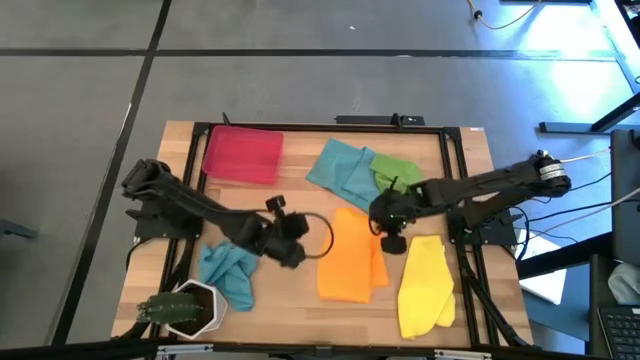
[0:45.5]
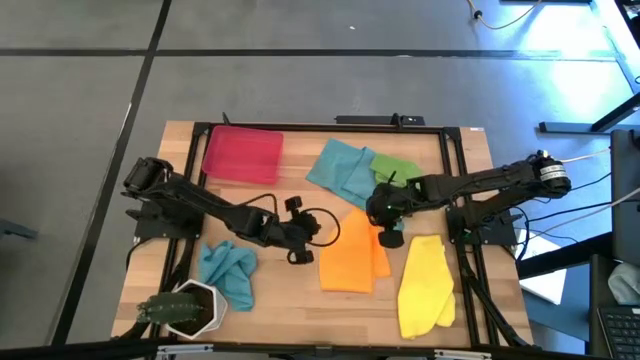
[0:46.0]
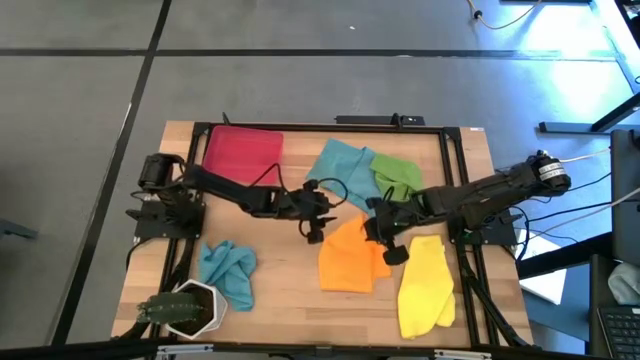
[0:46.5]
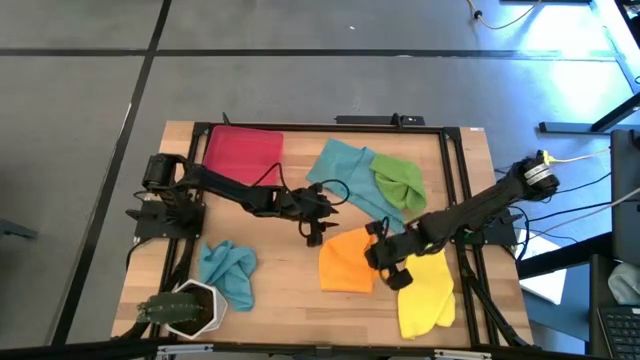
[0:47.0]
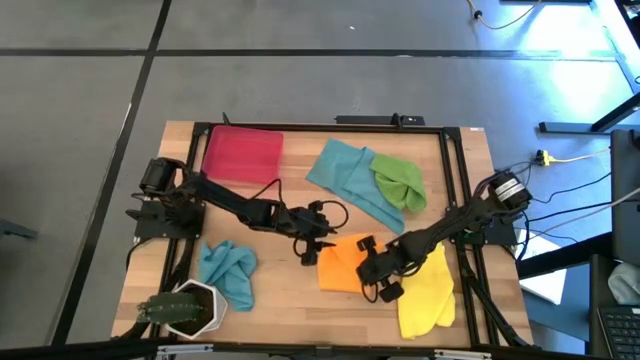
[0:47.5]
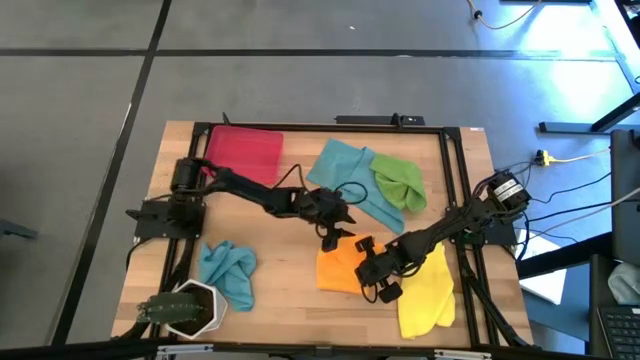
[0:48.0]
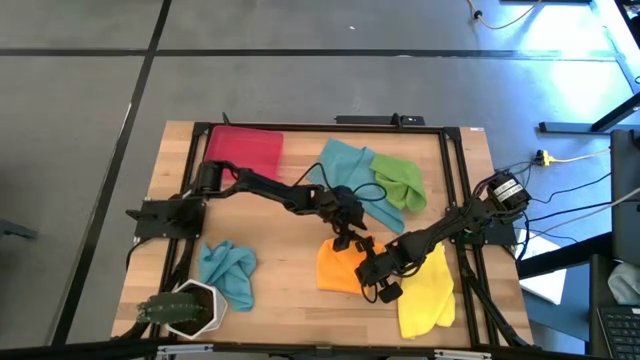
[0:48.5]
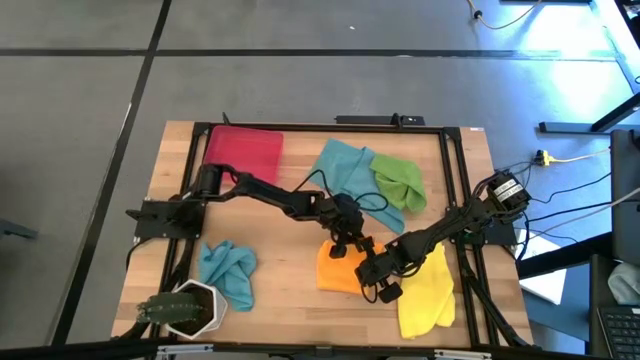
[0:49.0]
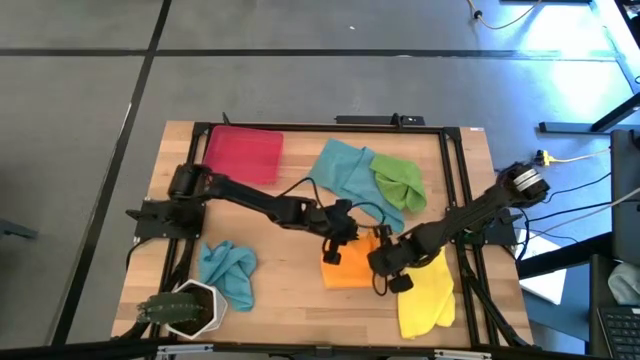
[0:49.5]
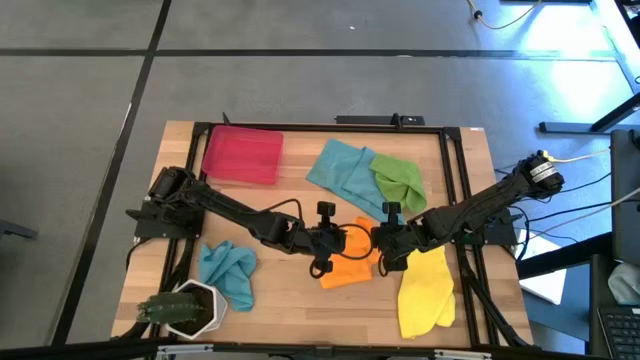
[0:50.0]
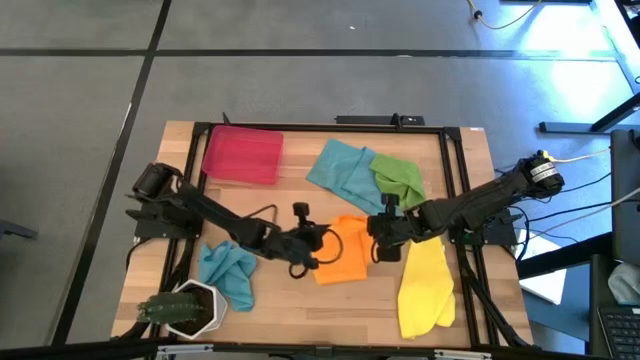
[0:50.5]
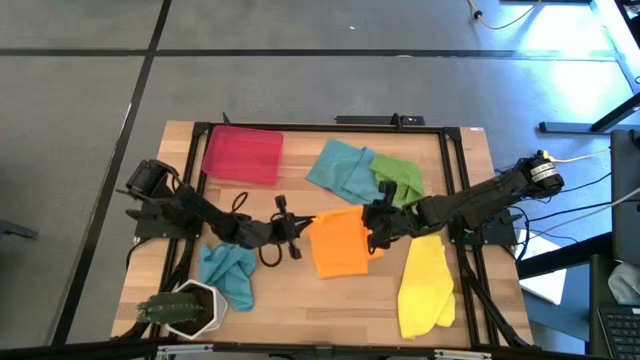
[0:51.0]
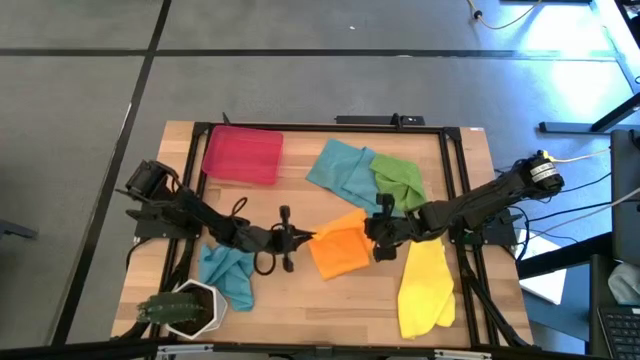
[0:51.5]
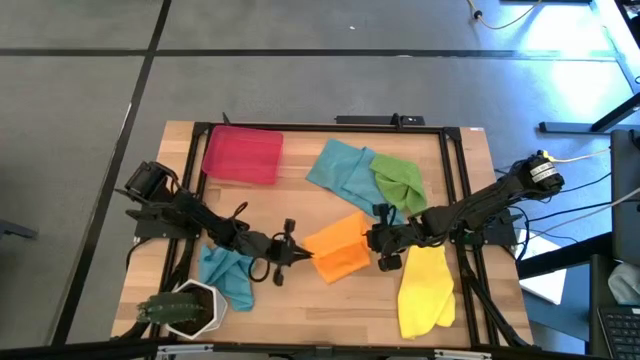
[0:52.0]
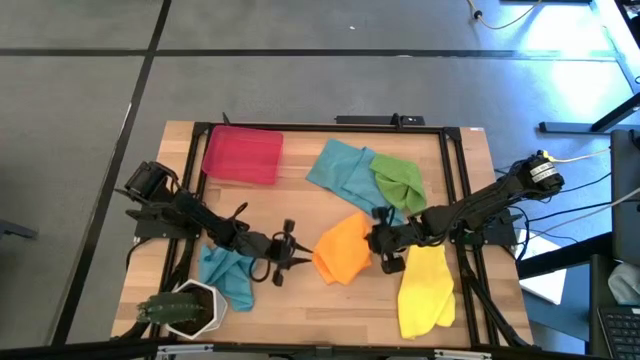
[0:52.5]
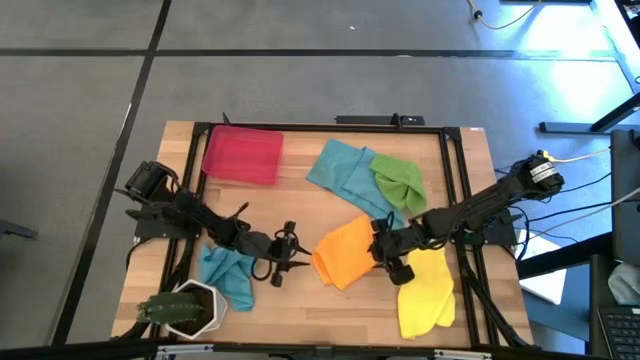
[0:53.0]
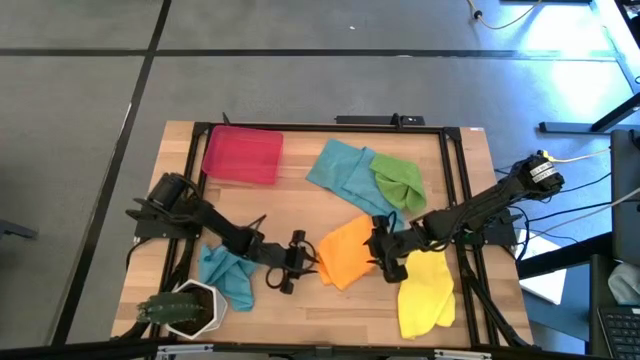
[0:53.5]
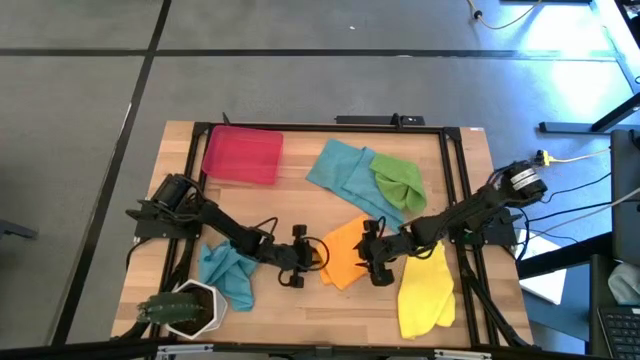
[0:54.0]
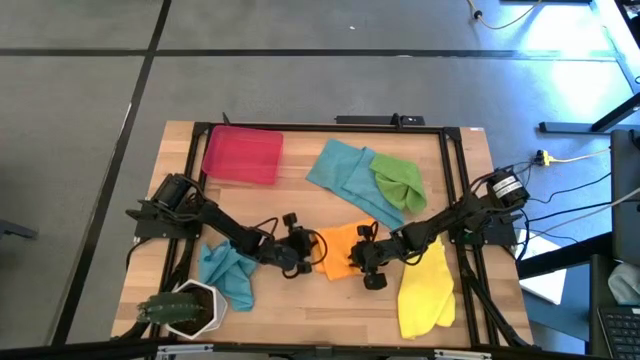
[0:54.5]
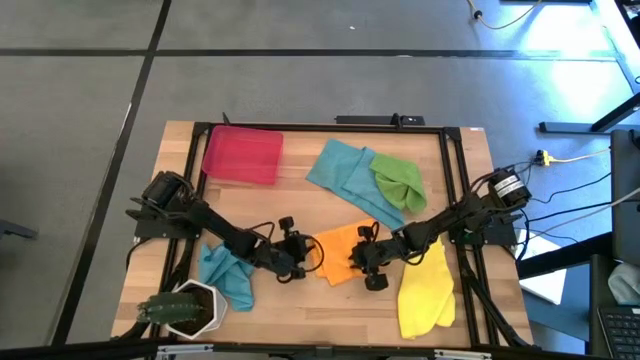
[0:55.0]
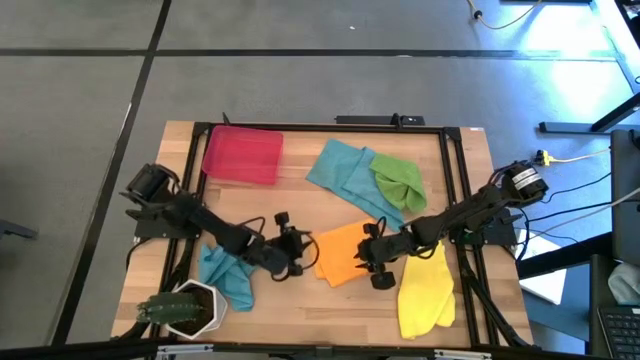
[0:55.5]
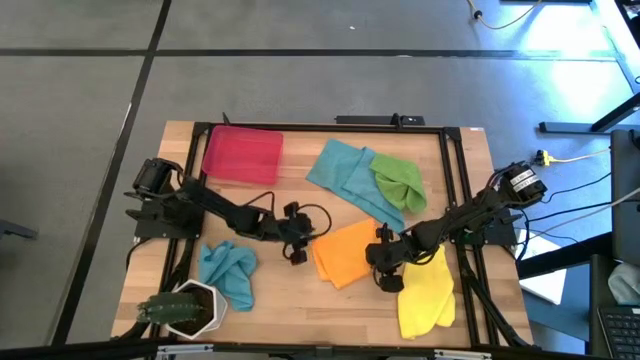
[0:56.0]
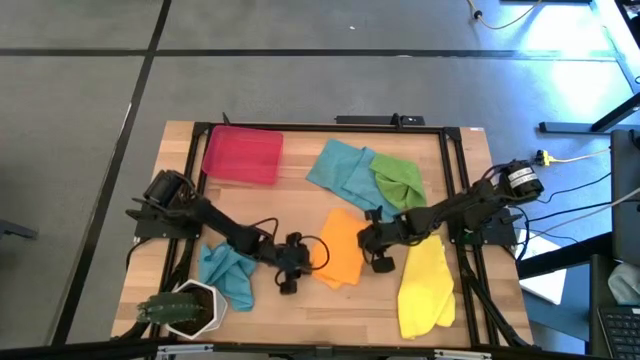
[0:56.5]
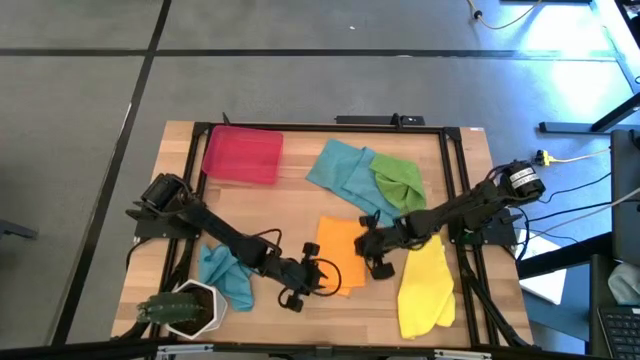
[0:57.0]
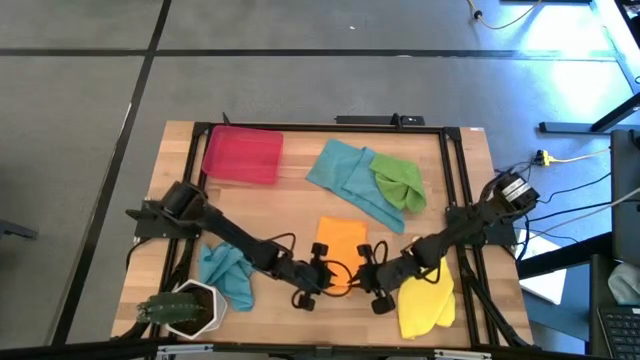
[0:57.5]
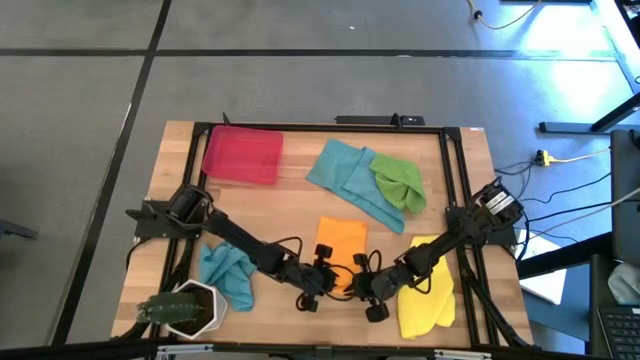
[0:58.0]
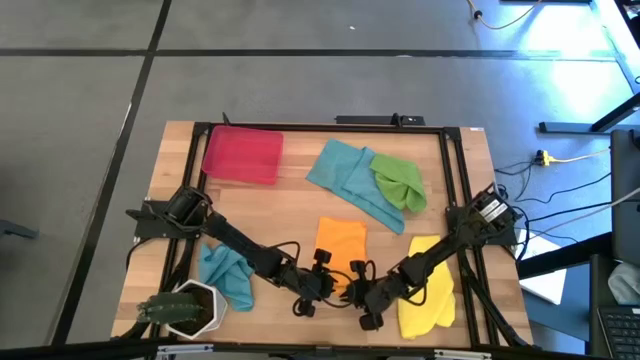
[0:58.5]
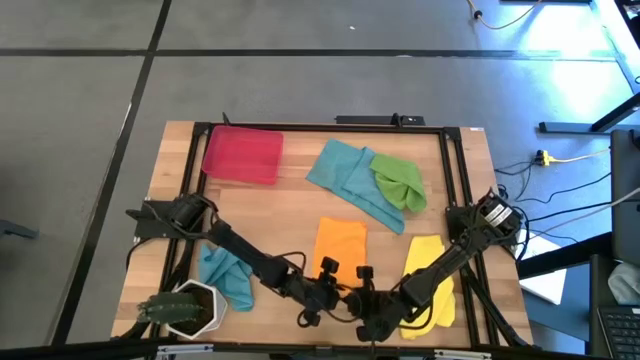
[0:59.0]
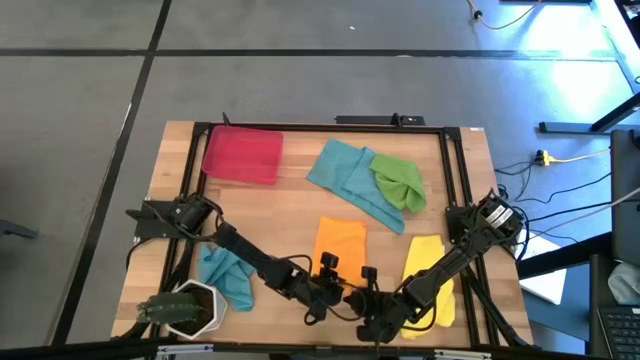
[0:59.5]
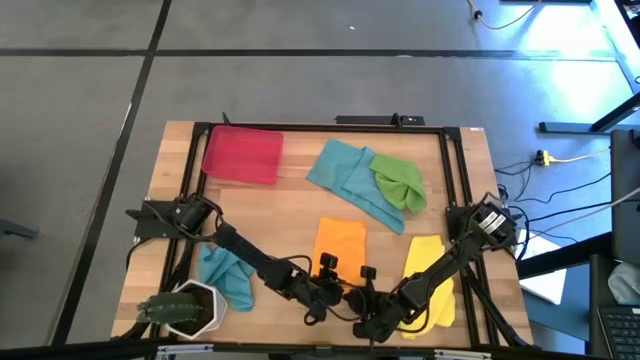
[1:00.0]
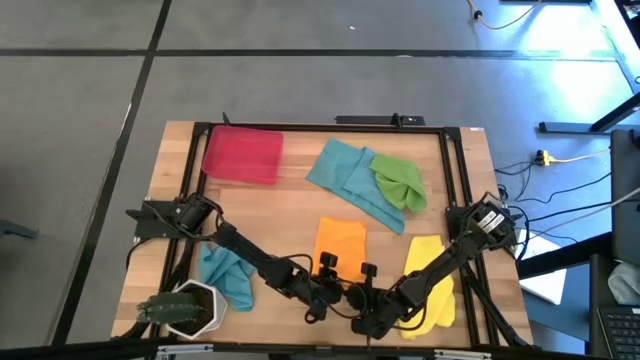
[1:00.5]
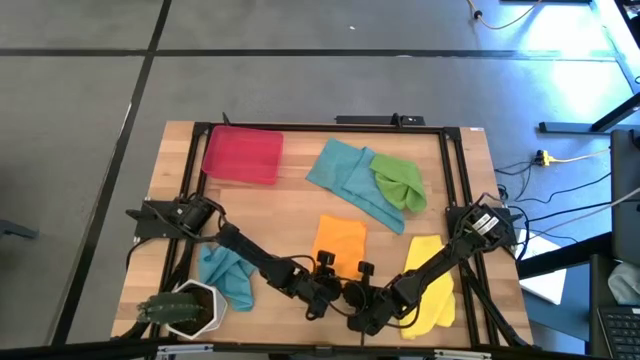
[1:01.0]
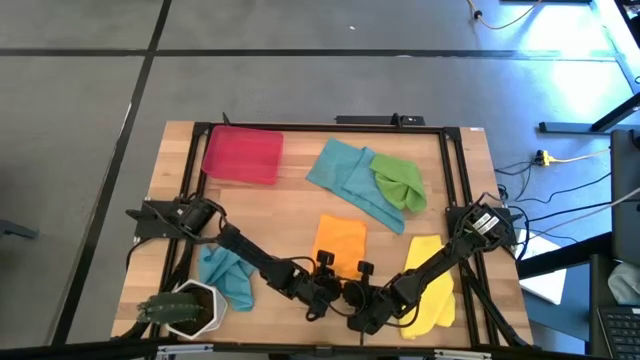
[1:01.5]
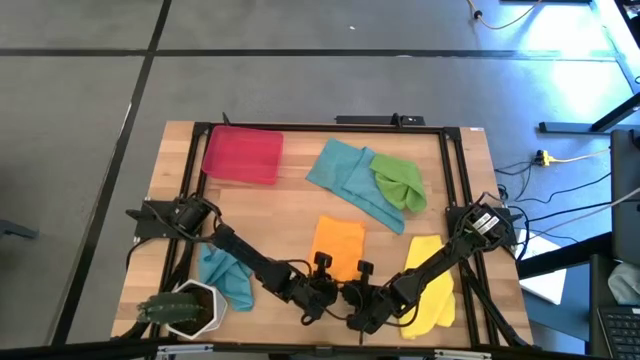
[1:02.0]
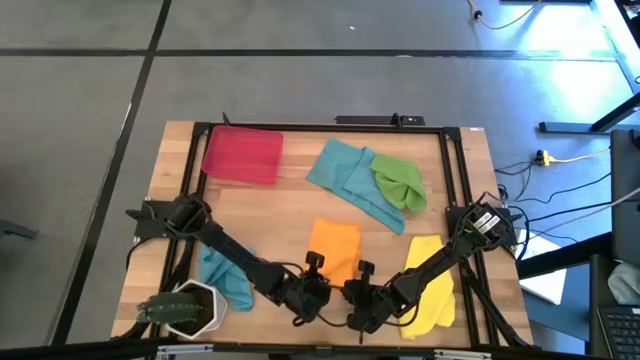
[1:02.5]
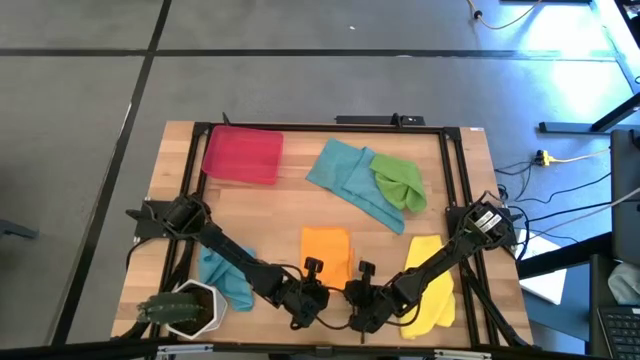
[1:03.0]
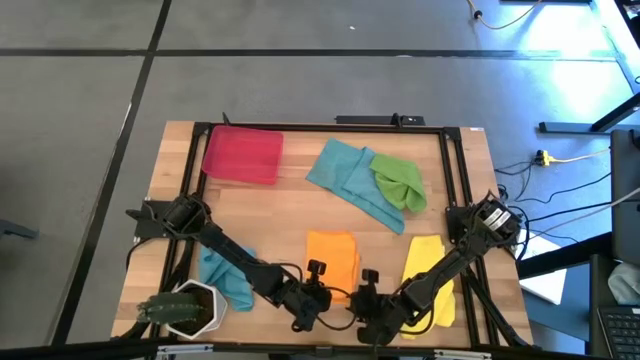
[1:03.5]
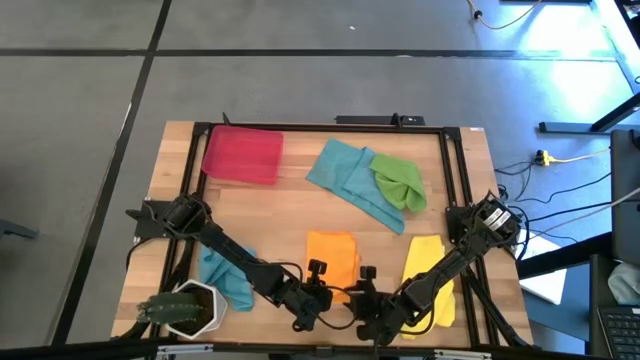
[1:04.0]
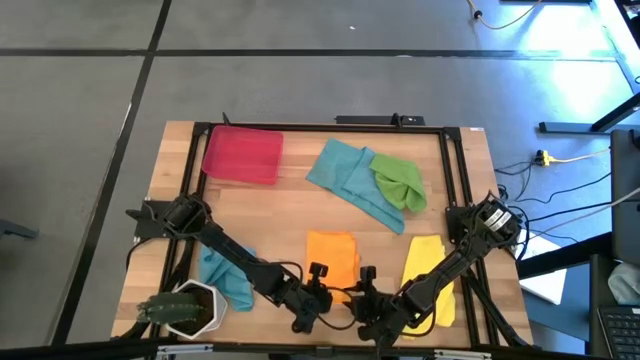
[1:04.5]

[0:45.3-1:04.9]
Task: Roll microfiber towels into tight, uniform cylinder then place into a basket
Fold the orange microfiber towel

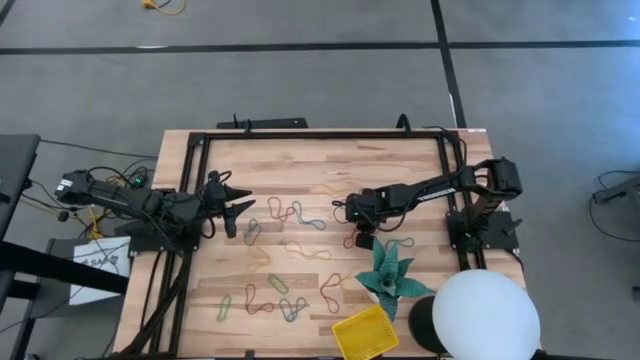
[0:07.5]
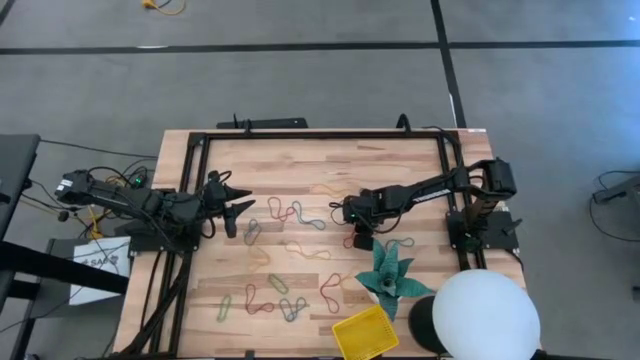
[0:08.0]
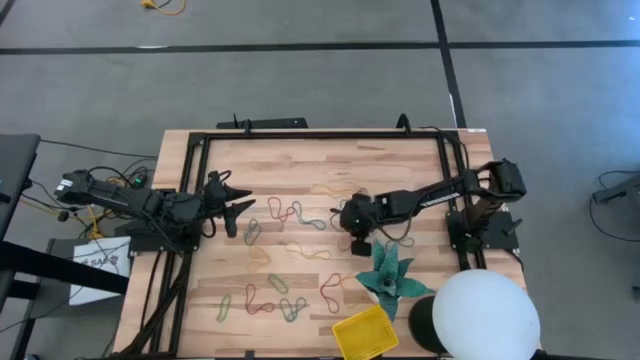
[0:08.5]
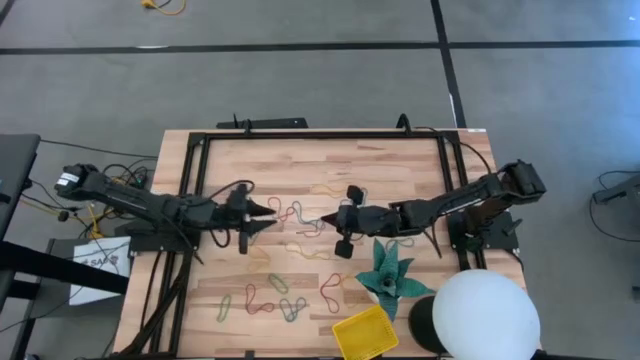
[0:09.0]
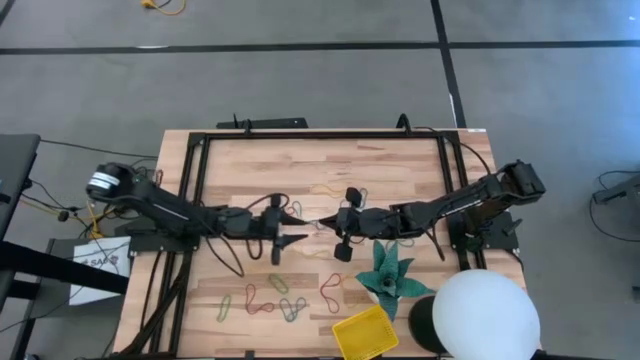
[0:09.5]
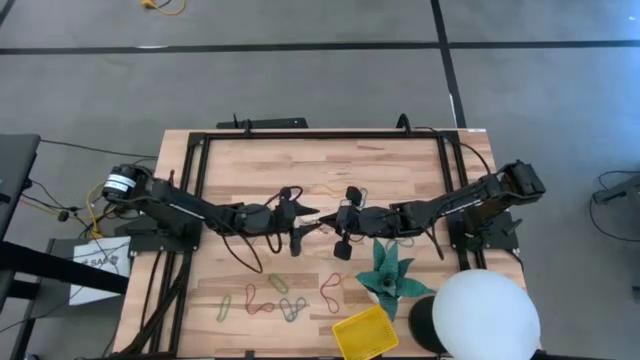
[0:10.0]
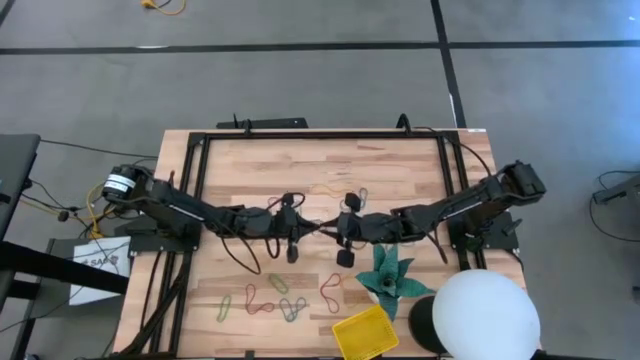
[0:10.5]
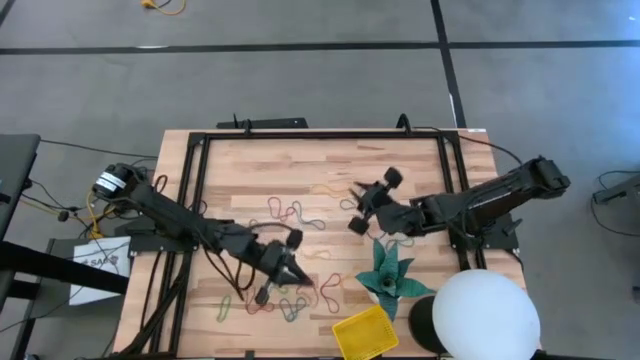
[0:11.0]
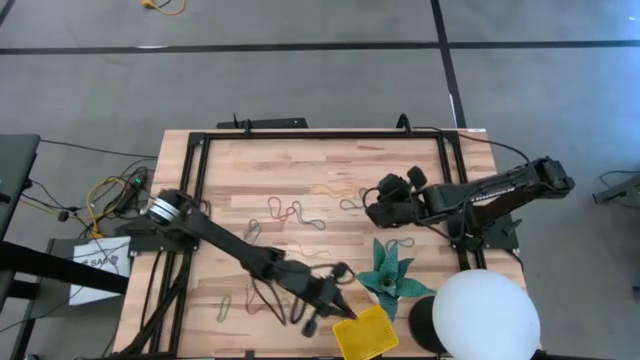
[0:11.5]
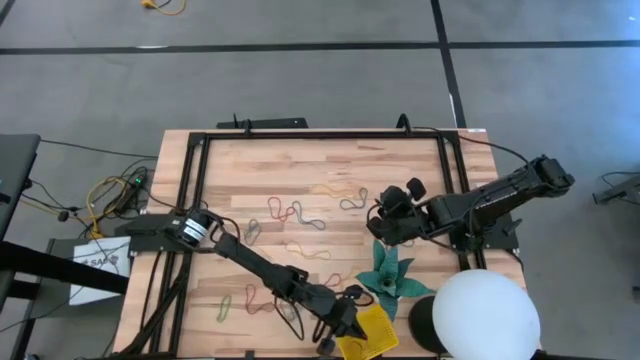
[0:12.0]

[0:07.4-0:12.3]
Task: Pick and place items into bin
Put the red rubber band into the yellow bin
